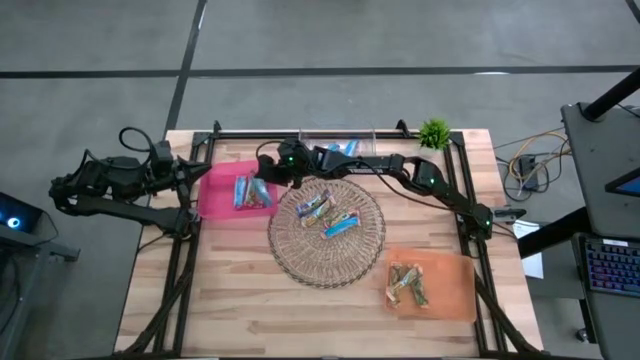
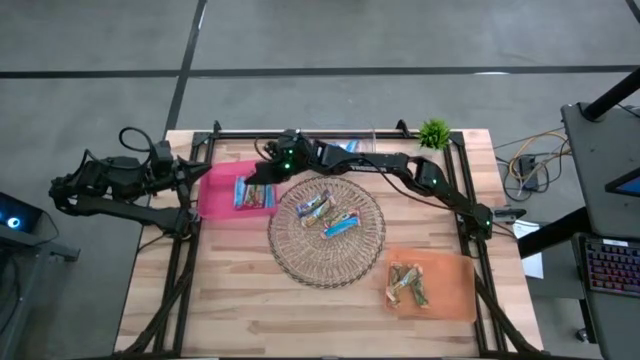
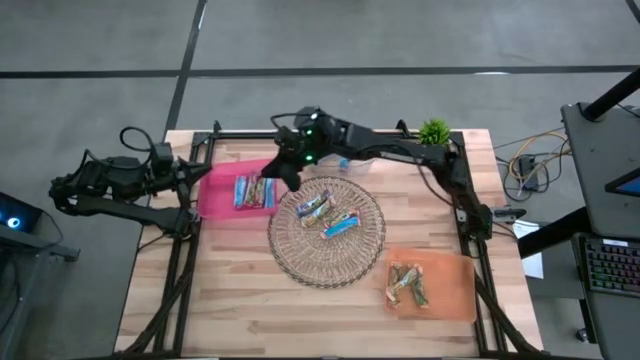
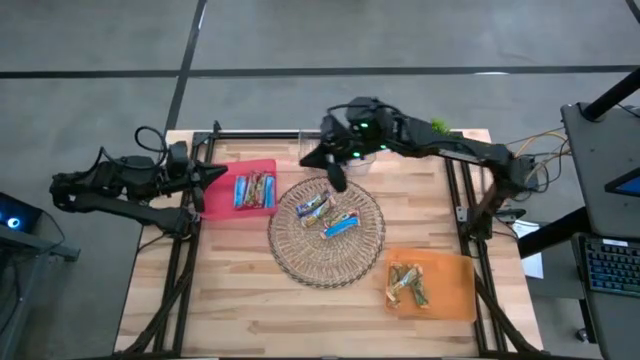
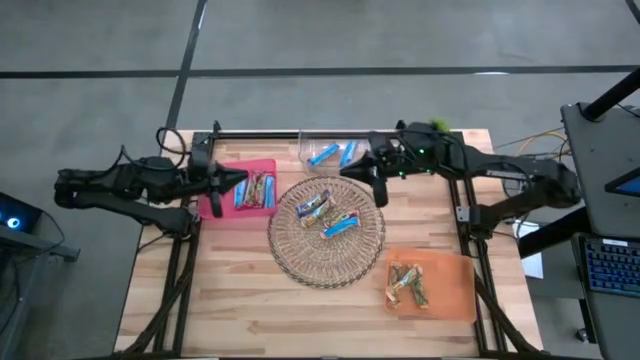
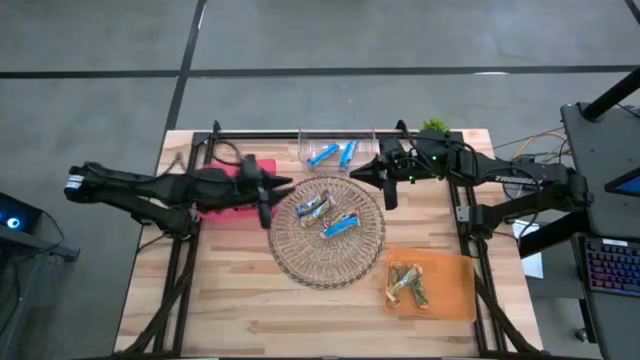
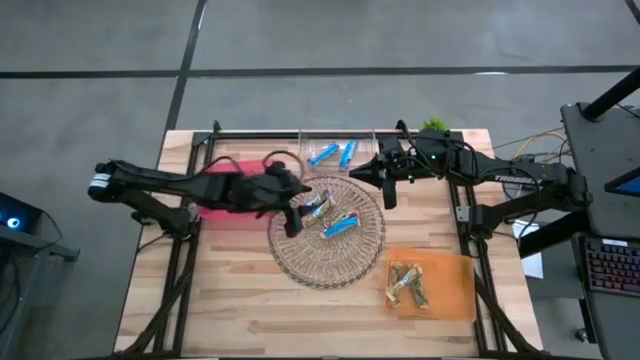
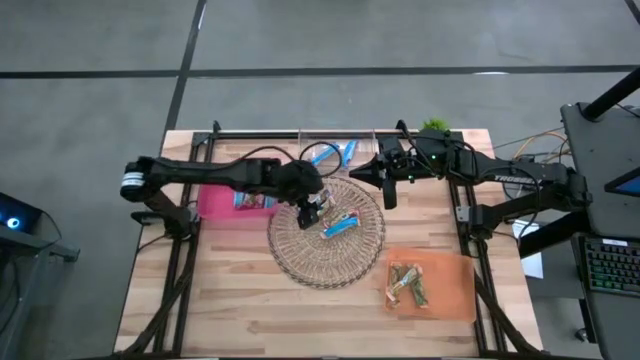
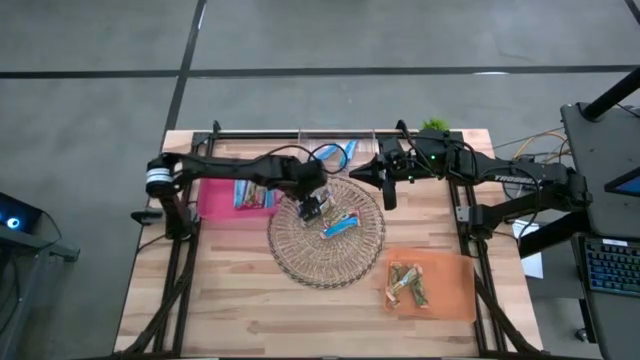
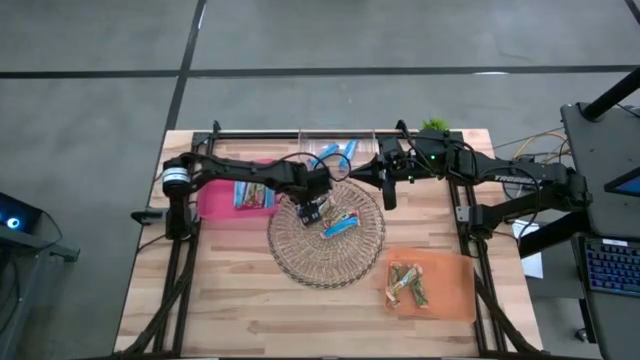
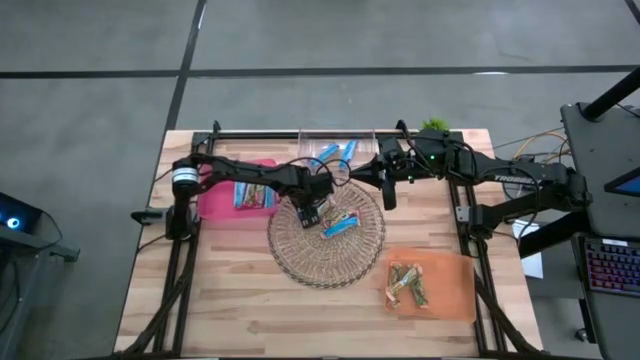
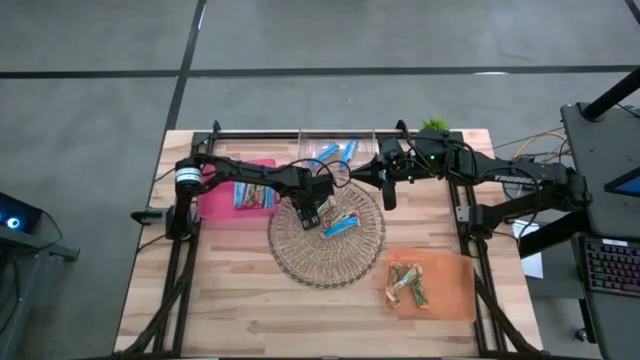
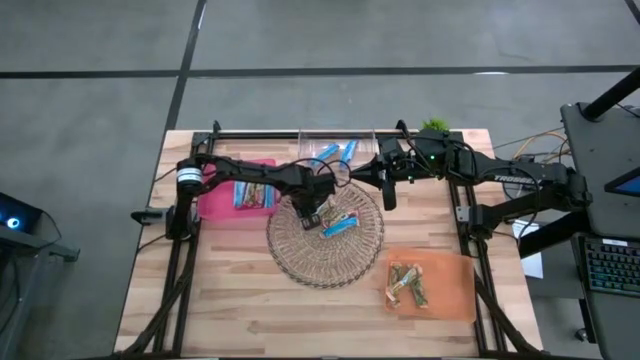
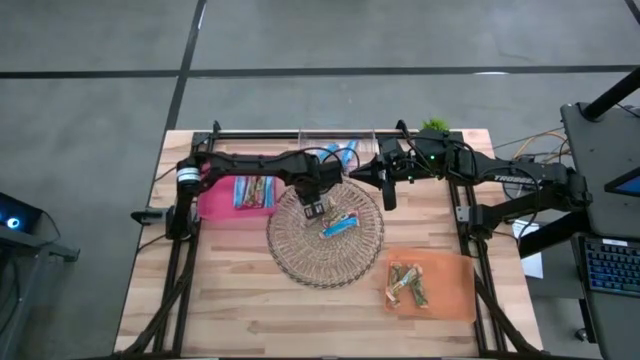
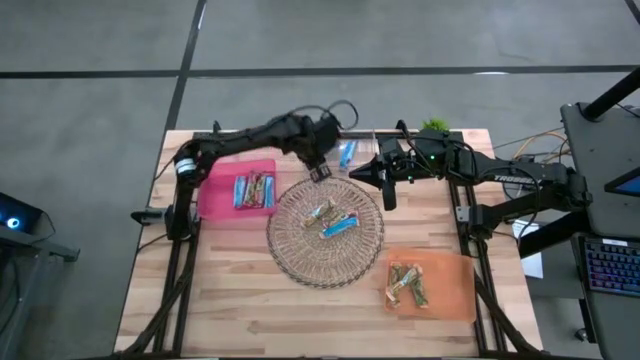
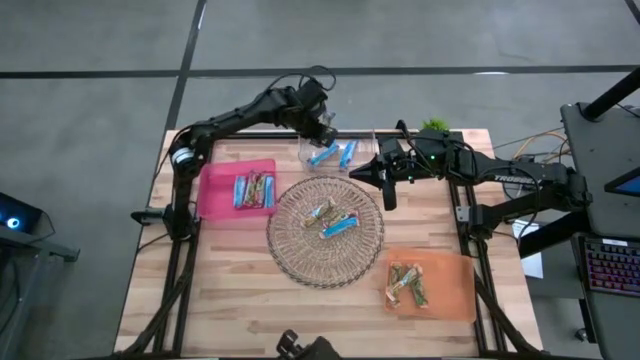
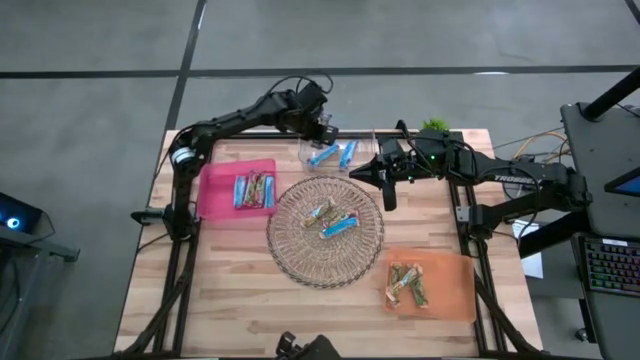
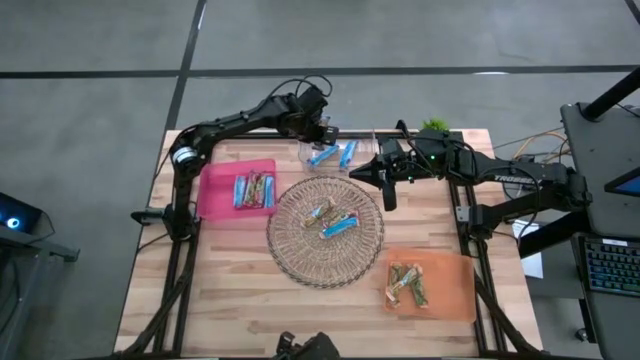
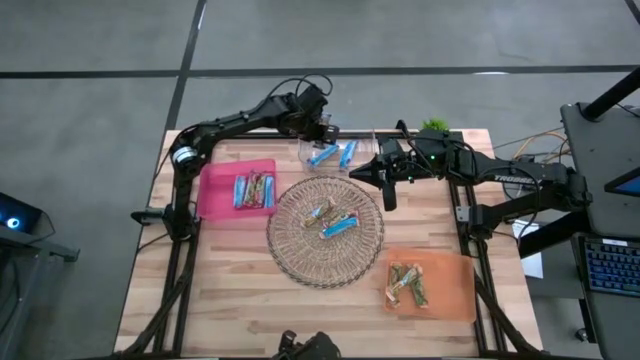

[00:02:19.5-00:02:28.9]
Task: Pick and place Granola Bars by type
Put the blue granola bar into the transparent bin

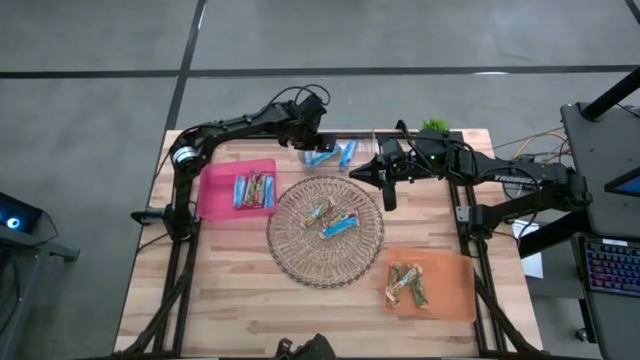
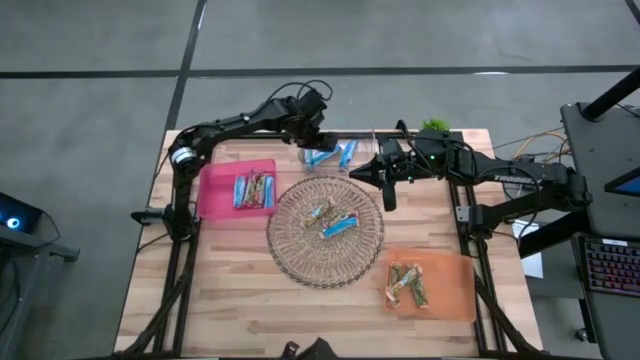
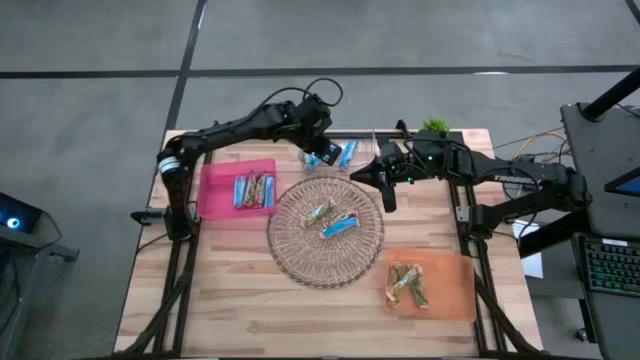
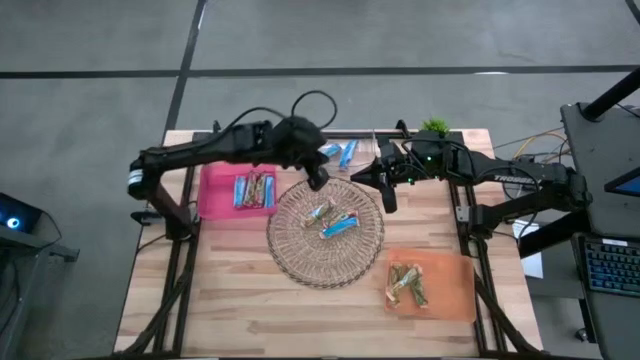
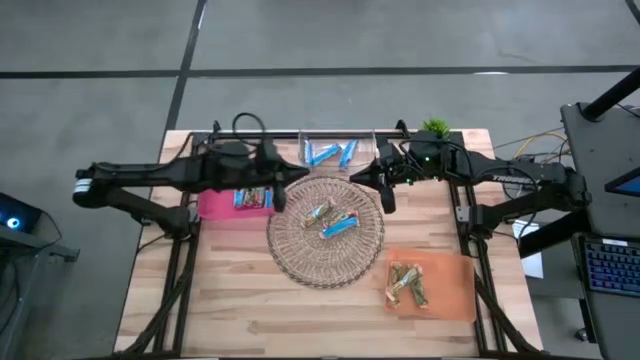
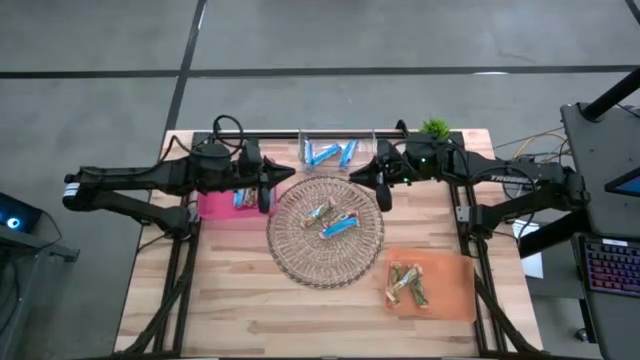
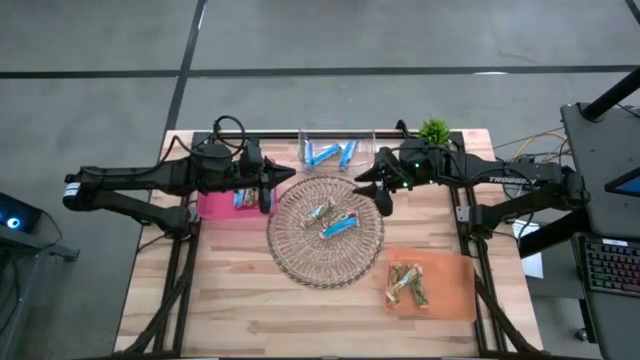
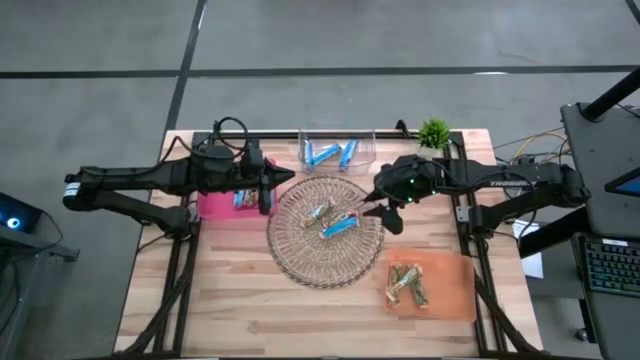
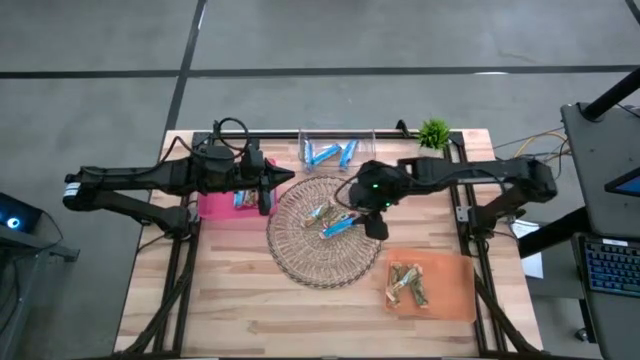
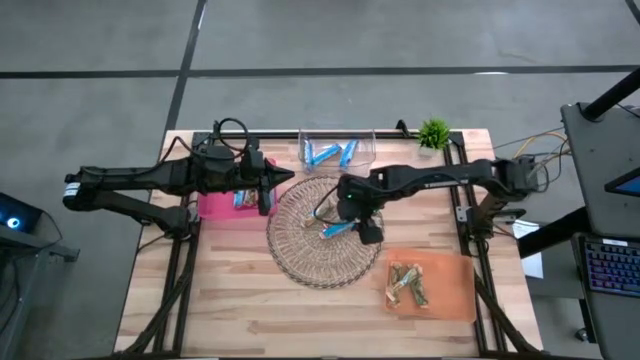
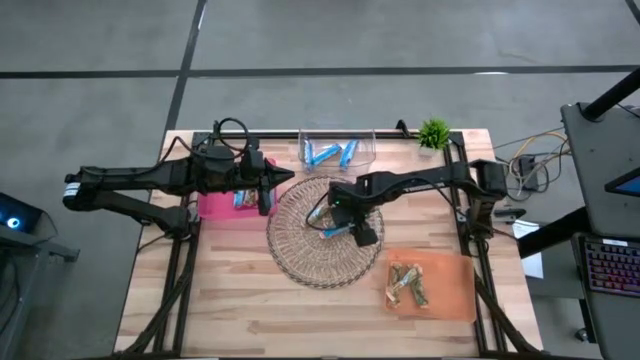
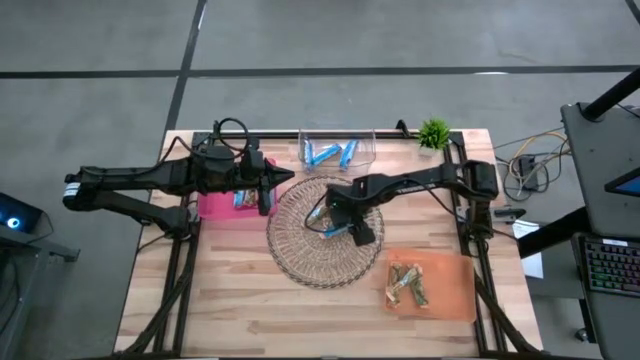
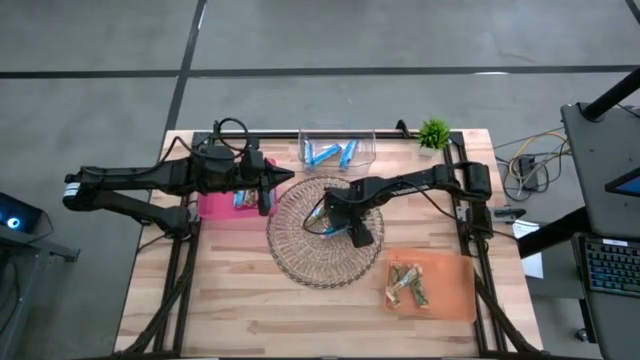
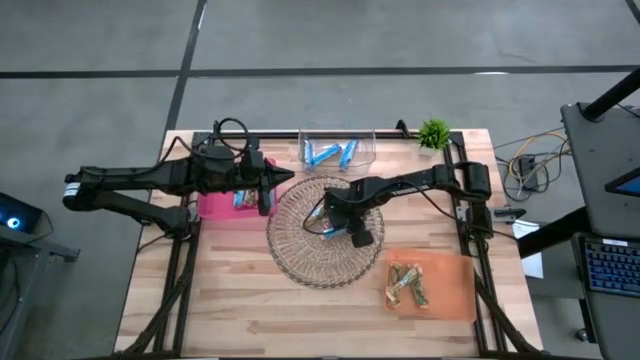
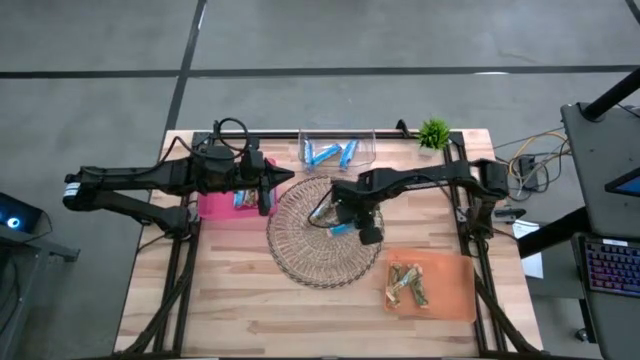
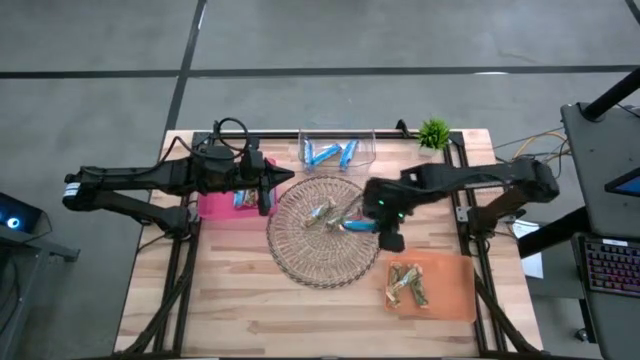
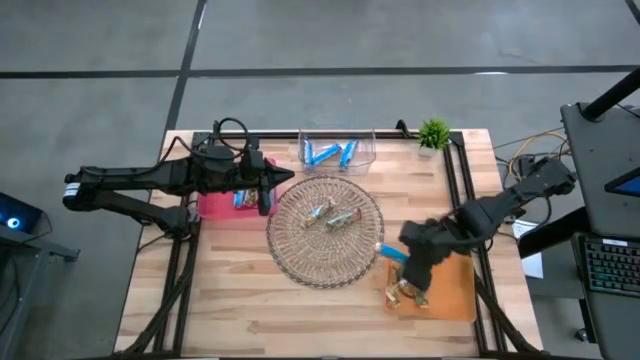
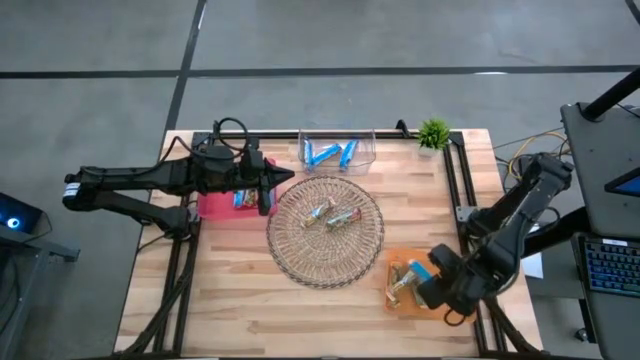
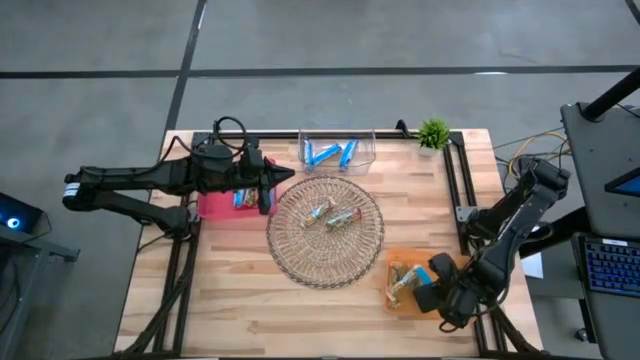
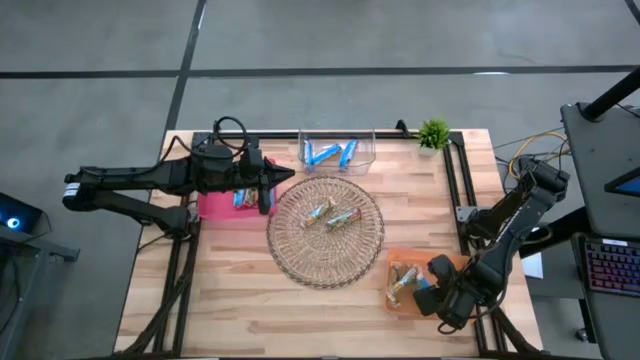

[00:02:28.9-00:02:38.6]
Put the yellow granola bar into the orange bin

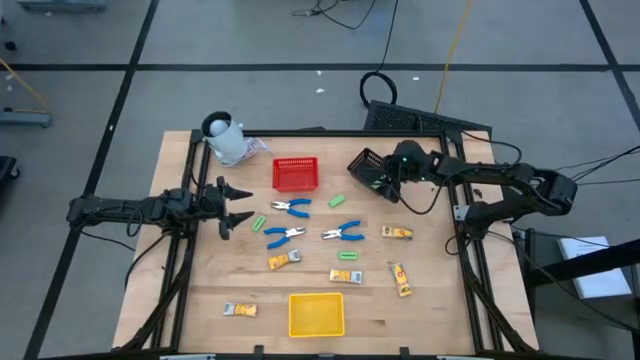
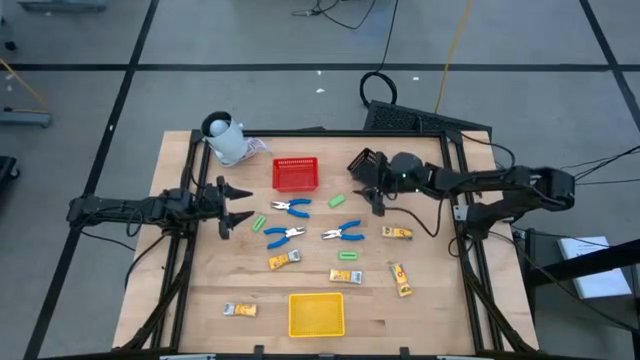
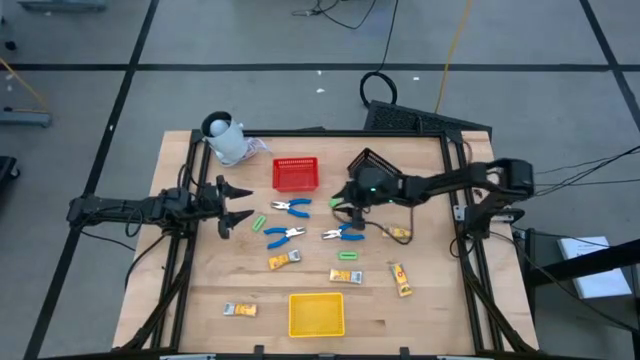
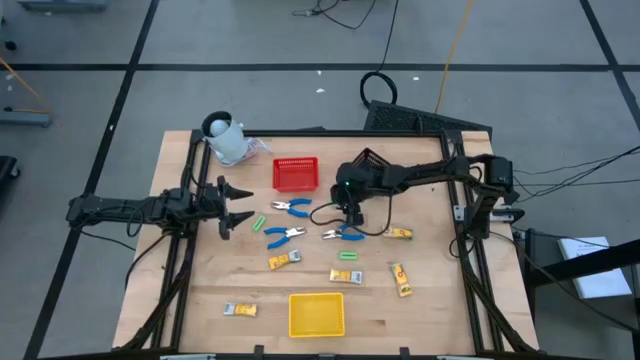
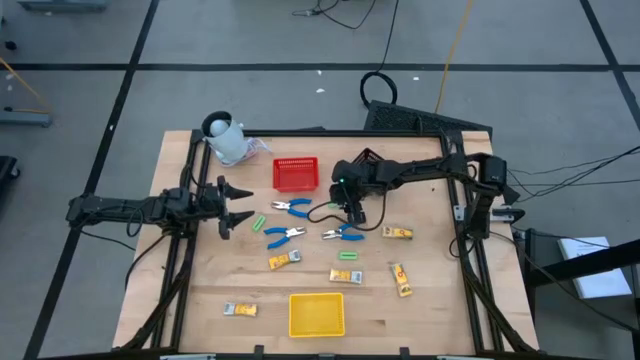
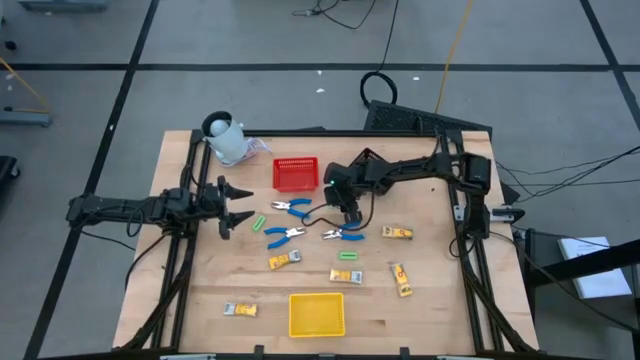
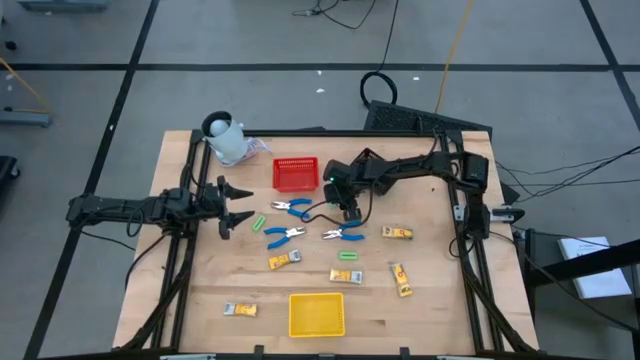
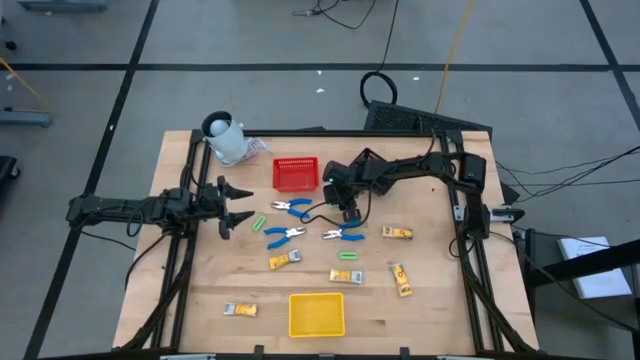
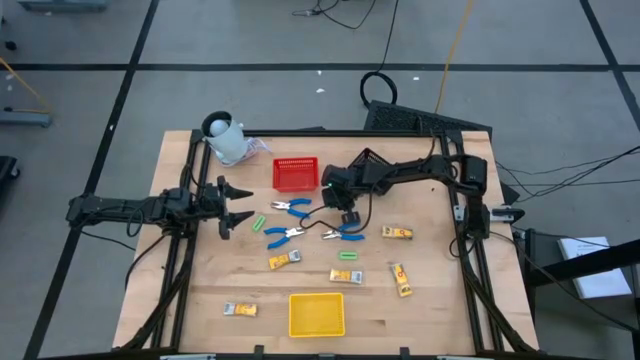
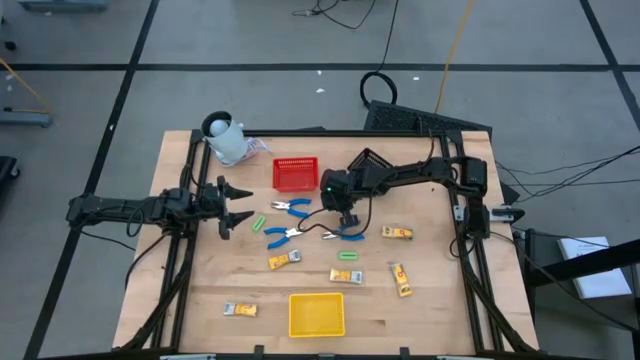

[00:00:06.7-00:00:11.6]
Task: Pick & Place School Supplies
Put the green eraser into the black bin
